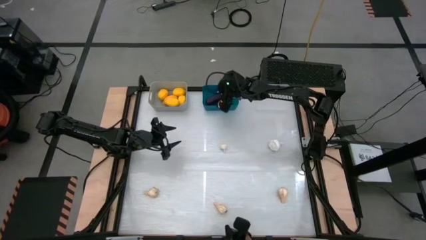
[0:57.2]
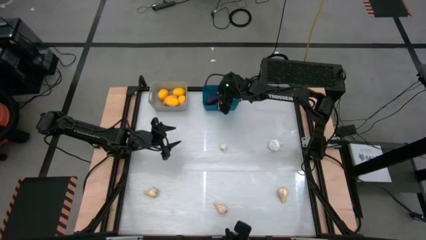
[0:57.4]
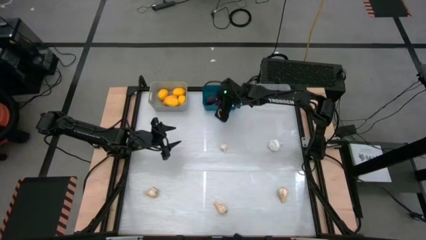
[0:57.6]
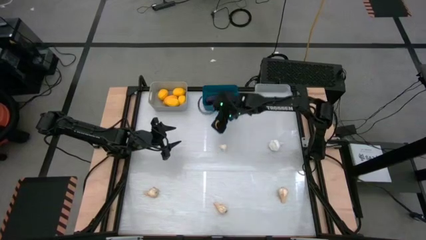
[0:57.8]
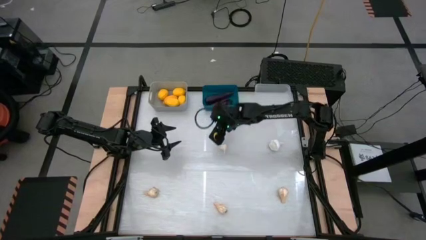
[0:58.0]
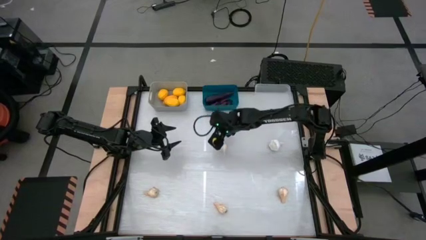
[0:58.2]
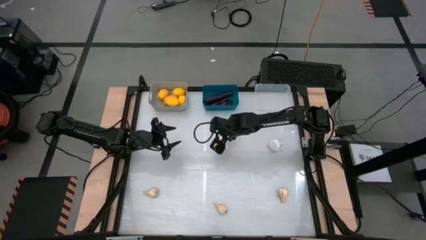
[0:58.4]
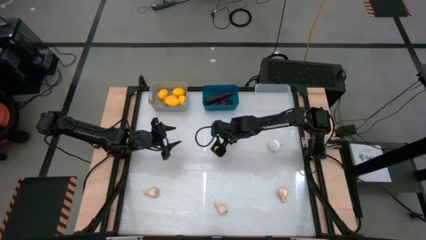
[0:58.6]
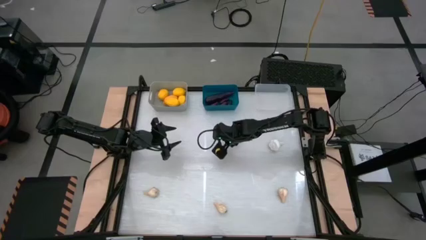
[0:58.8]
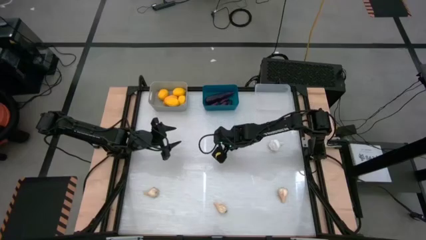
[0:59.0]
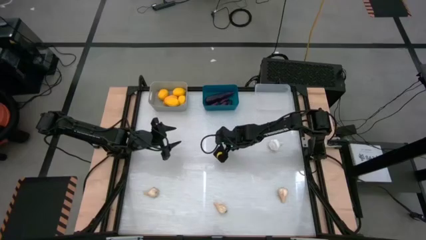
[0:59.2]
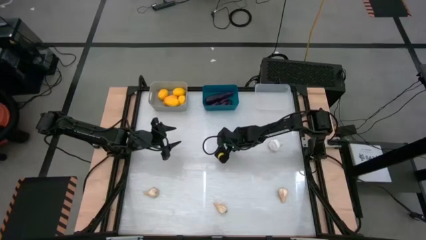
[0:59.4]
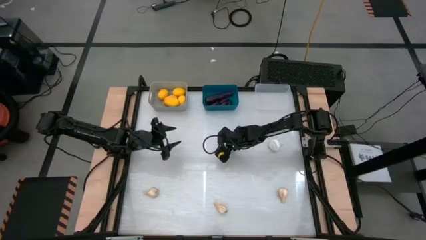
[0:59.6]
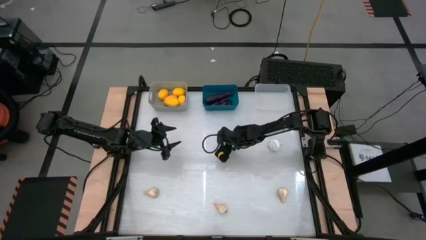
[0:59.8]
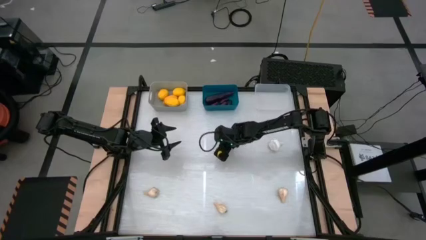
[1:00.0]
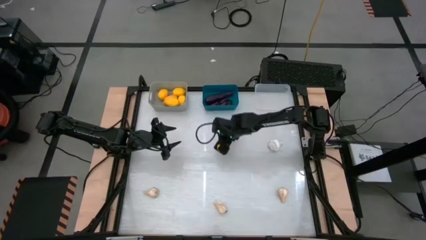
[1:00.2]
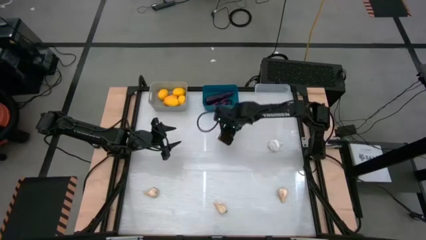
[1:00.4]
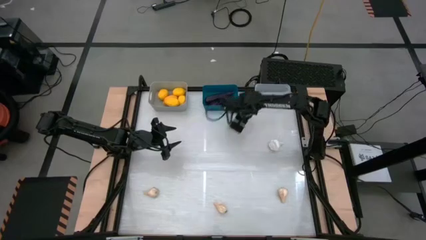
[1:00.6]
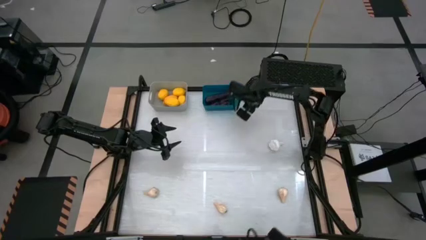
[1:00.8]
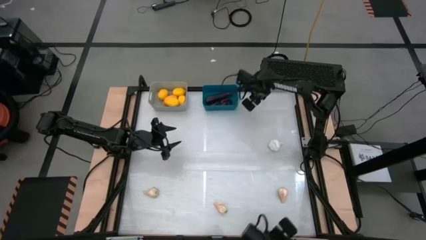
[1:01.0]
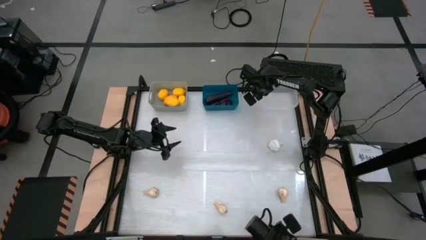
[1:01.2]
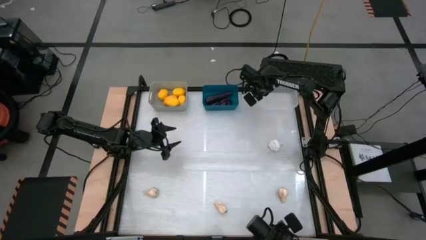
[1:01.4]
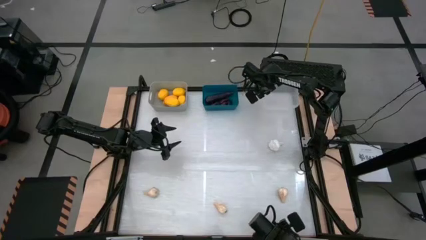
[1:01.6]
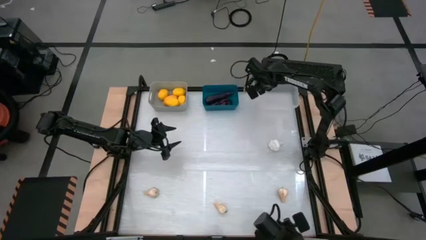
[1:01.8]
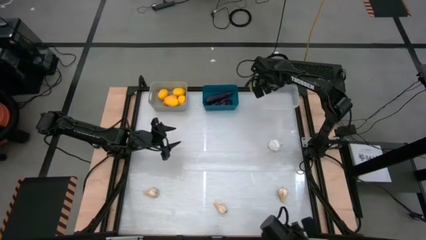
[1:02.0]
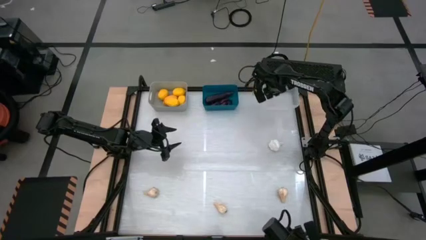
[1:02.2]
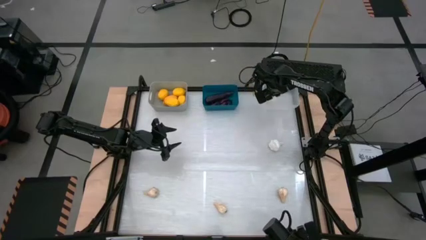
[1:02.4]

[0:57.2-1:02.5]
Task: Sort produce into baskets
Put the middle top garlic into the transparent bin

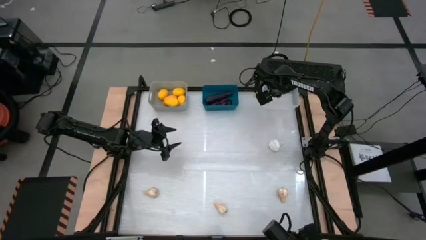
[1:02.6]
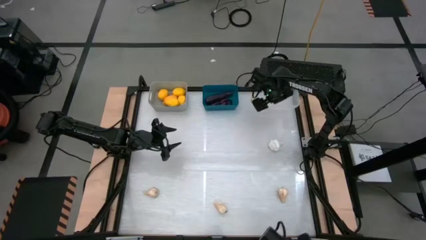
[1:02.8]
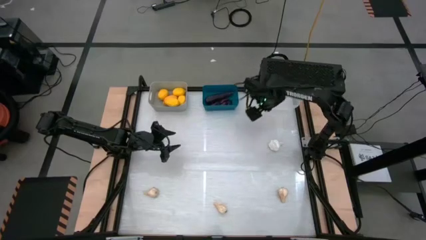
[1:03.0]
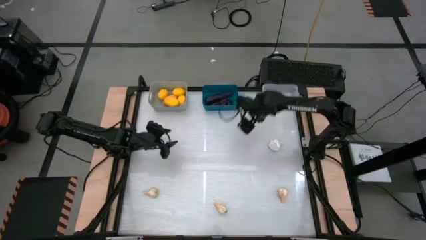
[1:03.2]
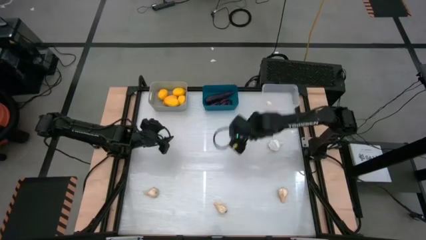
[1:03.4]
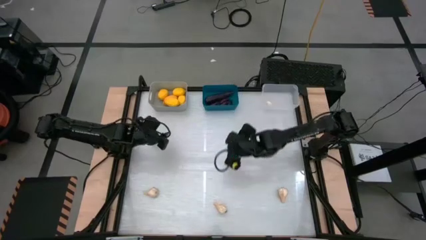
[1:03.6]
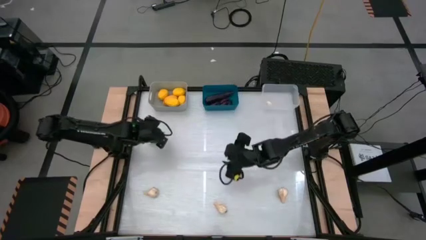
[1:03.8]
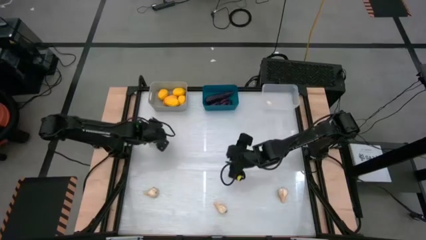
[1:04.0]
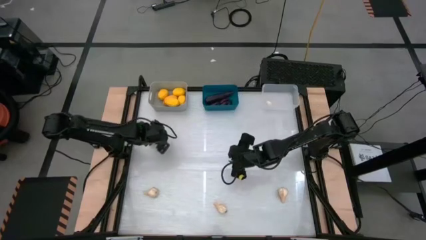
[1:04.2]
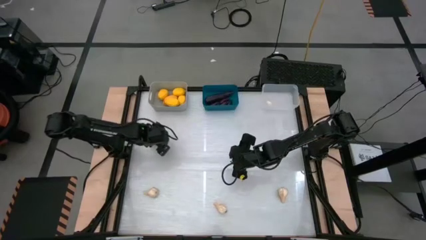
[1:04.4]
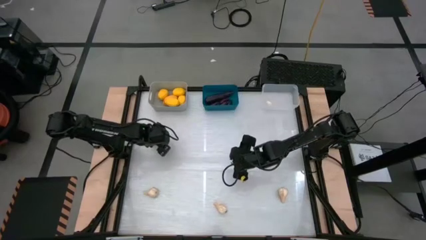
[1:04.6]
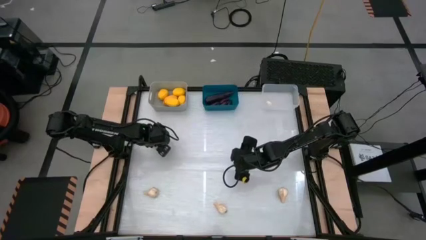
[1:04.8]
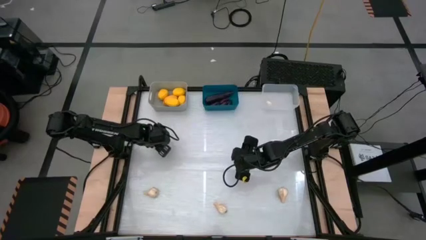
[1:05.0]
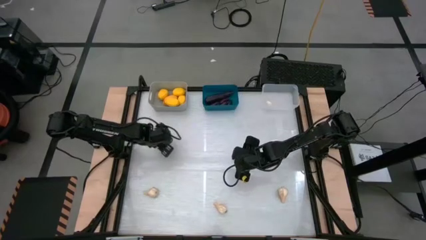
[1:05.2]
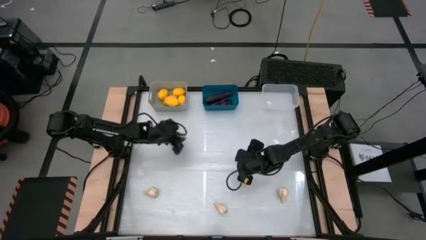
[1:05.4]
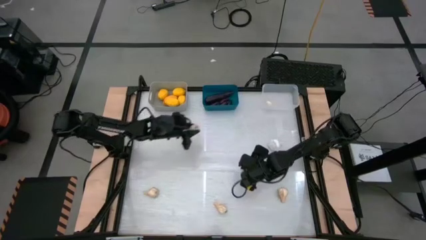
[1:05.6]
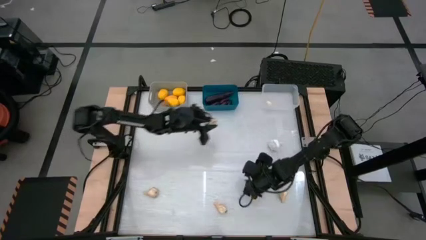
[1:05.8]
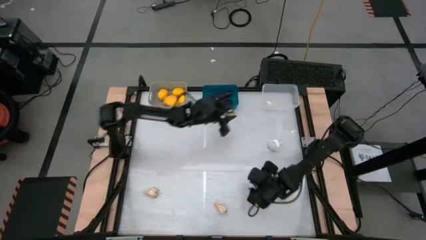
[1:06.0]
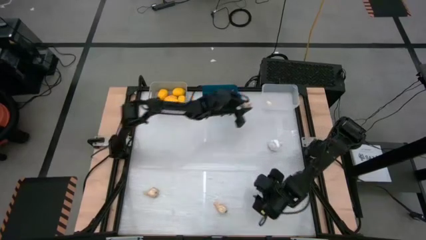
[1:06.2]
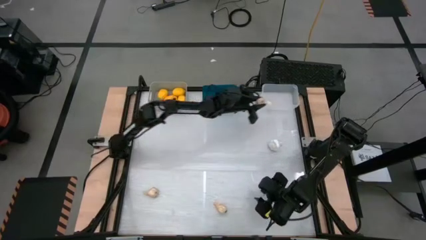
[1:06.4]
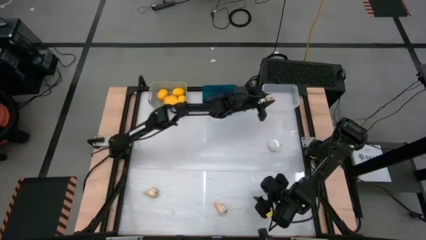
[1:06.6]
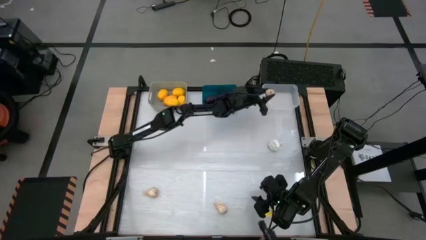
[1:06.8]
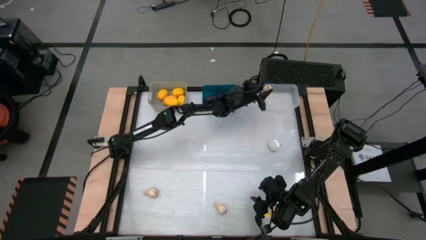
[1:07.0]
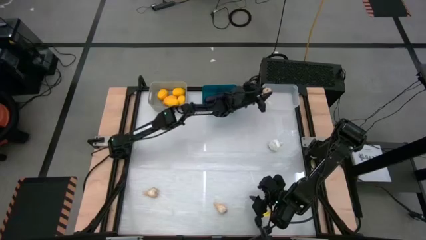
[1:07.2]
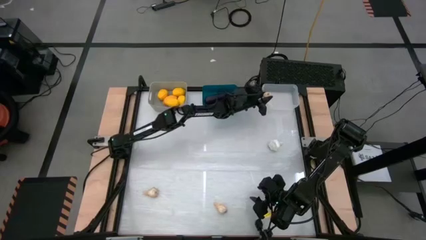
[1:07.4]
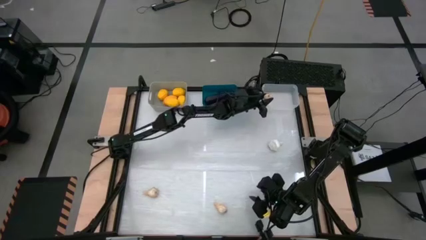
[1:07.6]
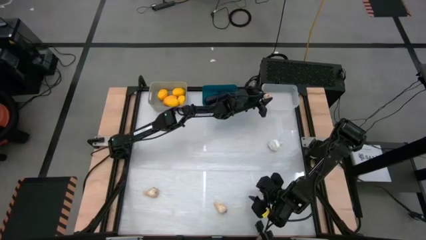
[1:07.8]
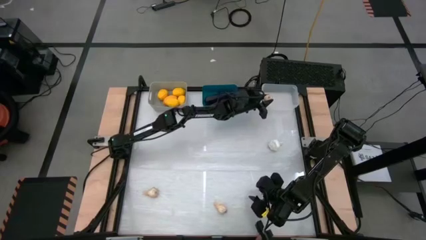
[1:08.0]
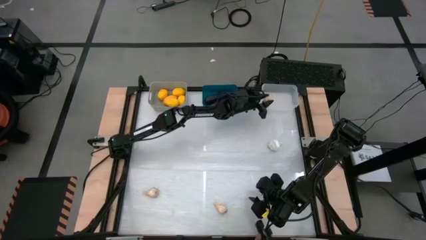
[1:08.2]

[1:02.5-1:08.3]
Put the top left garlic into the transparent bin

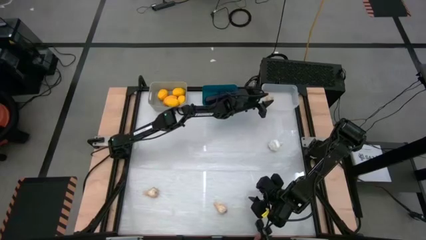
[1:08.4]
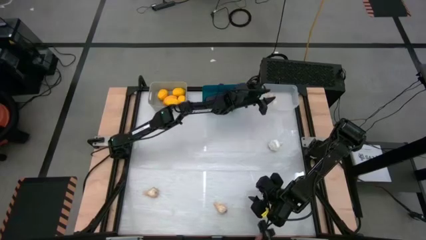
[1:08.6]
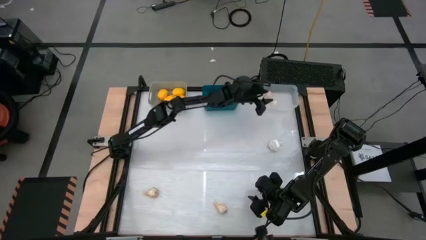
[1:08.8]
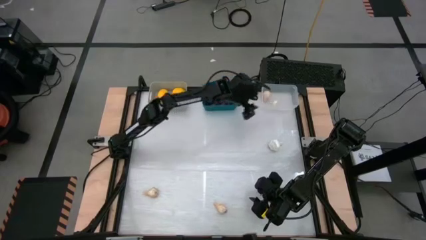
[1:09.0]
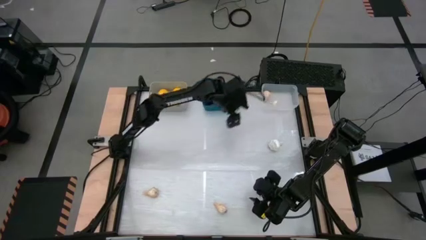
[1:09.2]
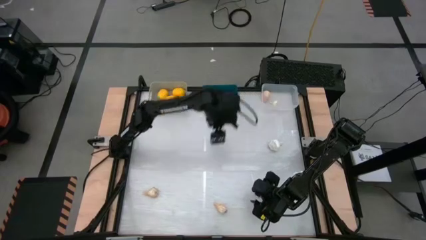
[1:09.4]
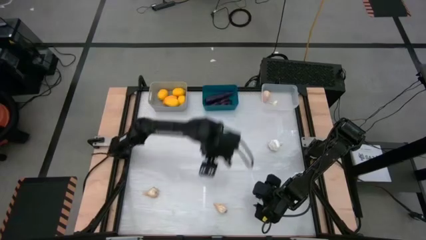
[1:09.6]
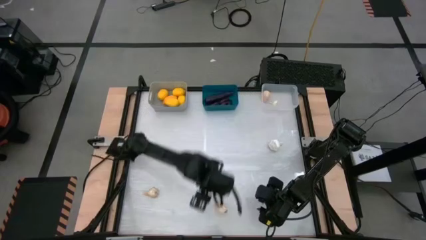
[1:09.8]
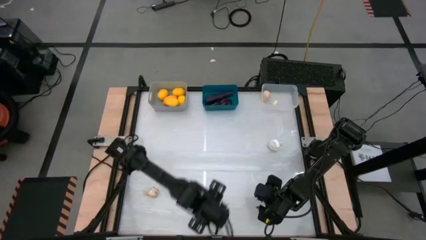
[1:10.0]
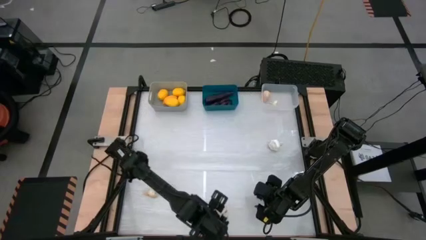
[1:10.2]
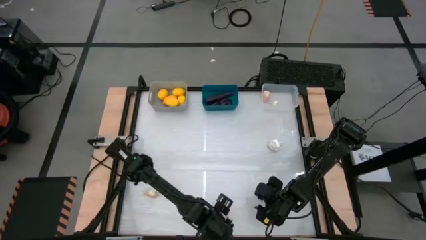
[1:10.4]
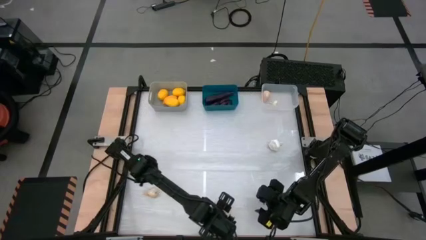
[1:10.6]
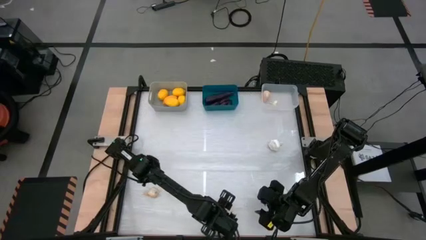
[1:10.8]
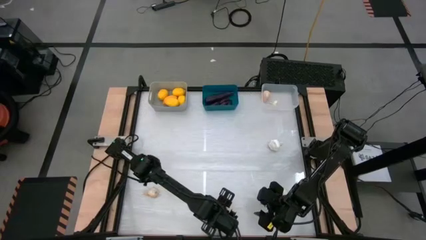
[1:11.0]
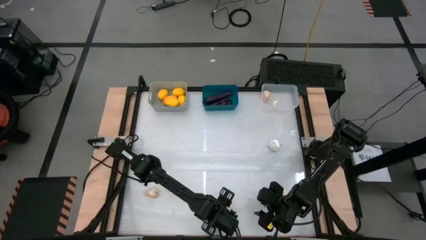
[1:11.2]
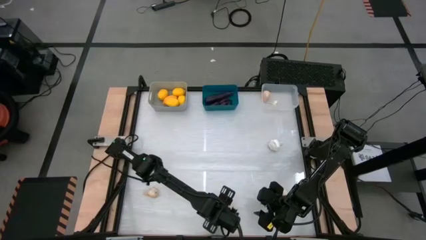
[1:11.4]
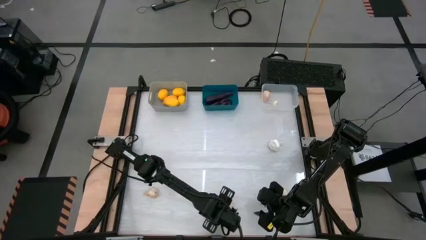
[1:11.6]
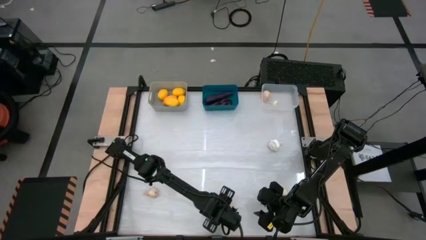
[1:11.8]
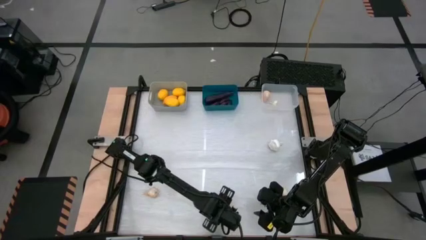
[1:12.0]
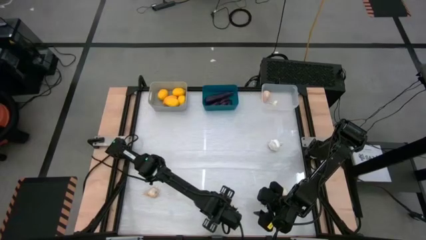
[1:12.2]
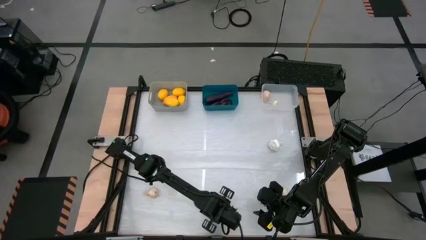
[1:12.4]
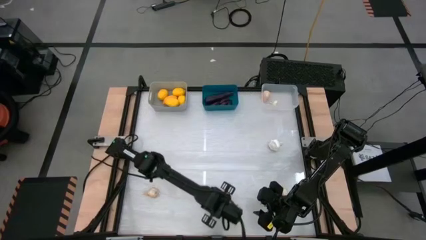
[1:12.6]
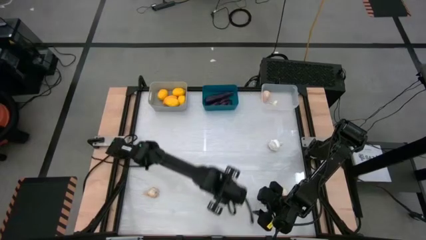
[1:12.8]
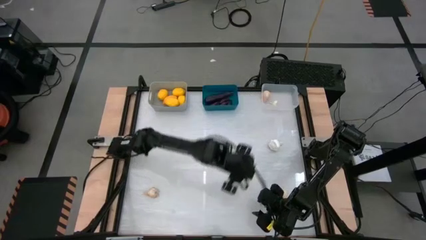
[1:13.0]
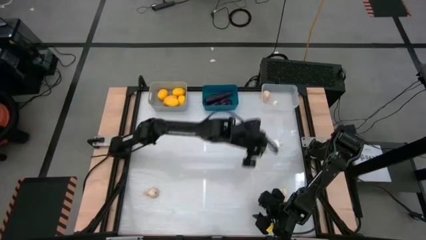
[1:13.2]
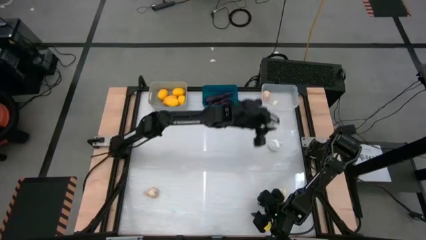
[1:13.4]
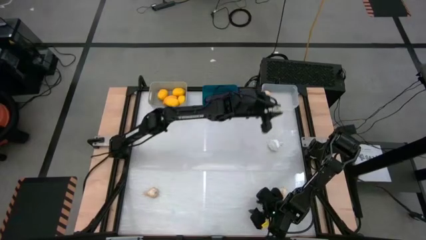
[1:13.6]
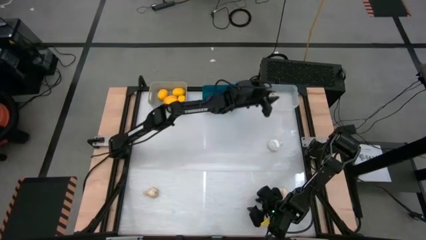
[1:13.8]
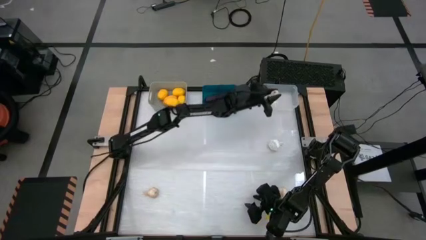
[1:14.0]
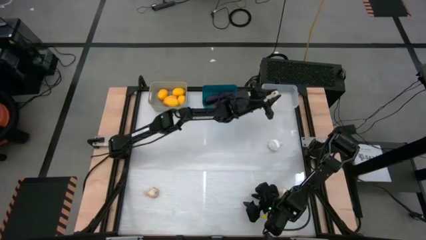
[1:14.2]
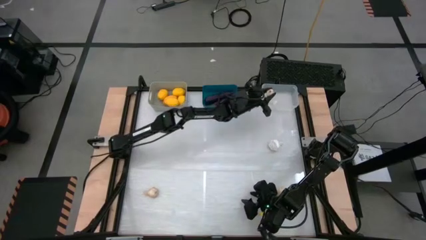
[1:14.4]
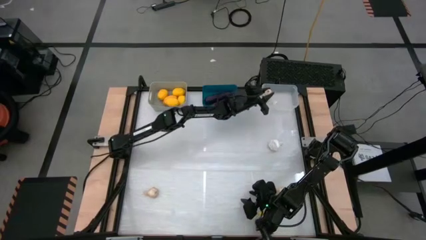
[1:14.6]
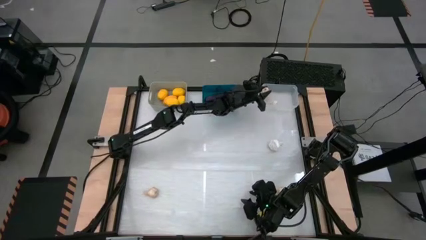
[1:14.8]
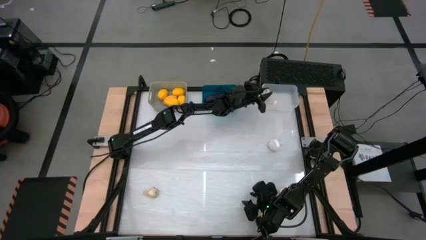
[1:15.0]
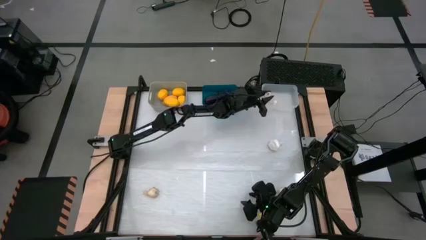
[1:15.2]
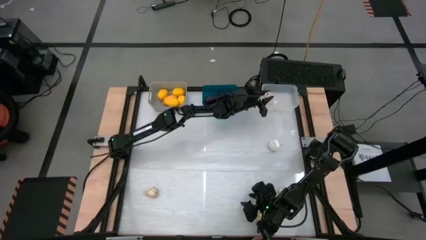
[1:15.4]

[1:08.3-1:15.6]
Put the middle bottom garlic into the transparent bin
